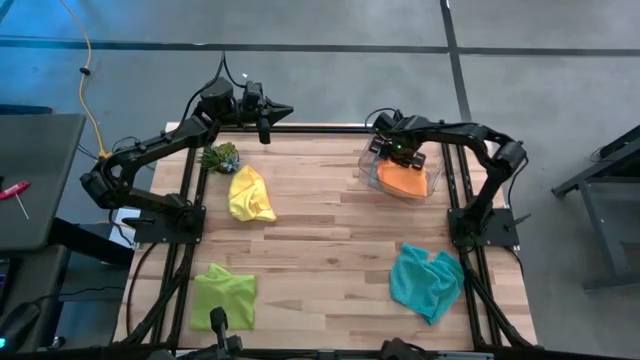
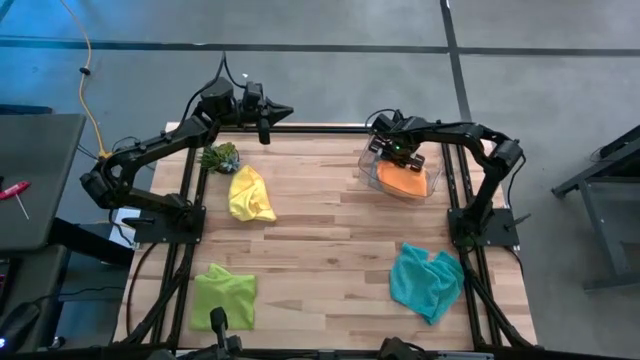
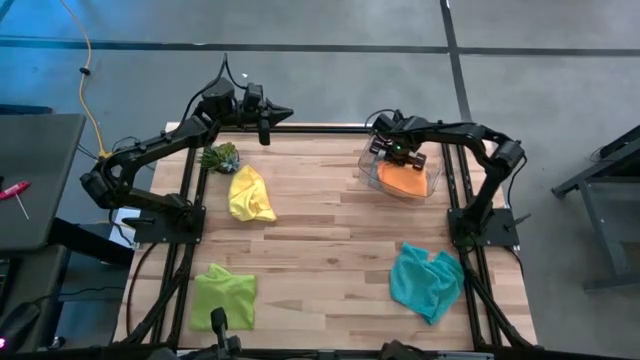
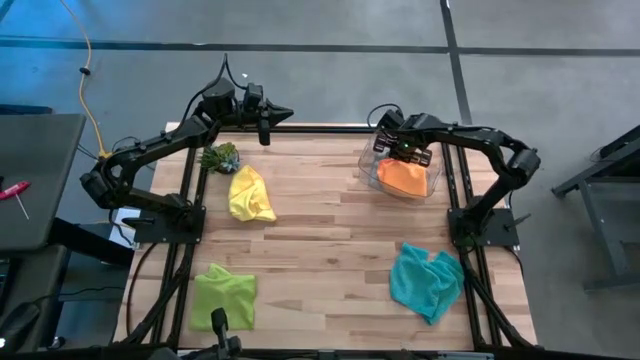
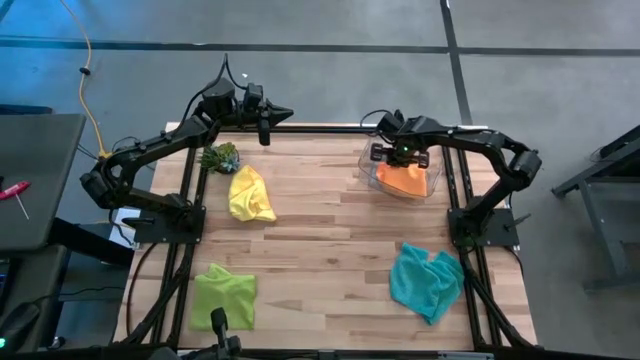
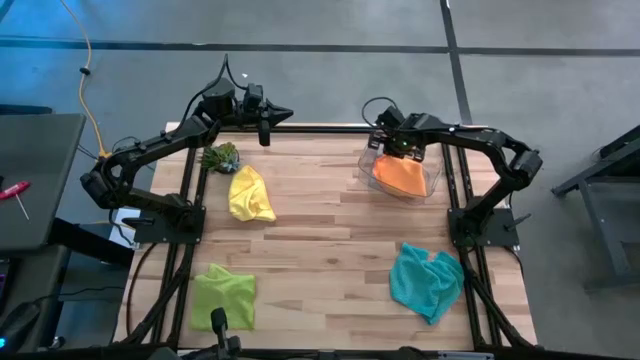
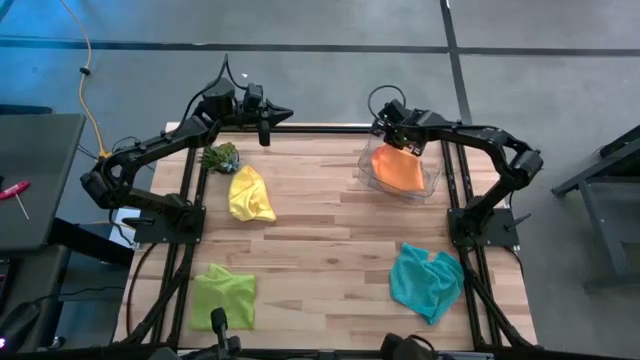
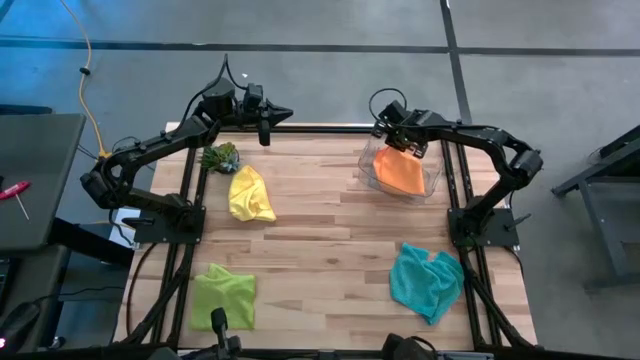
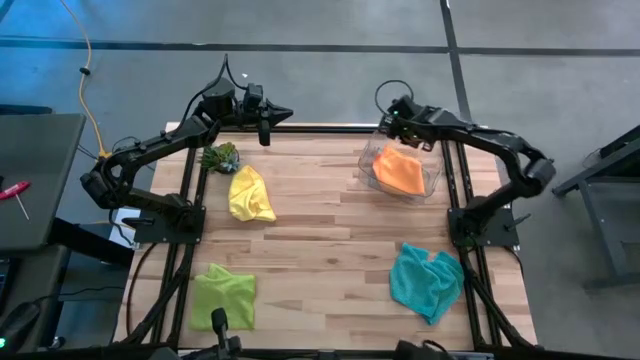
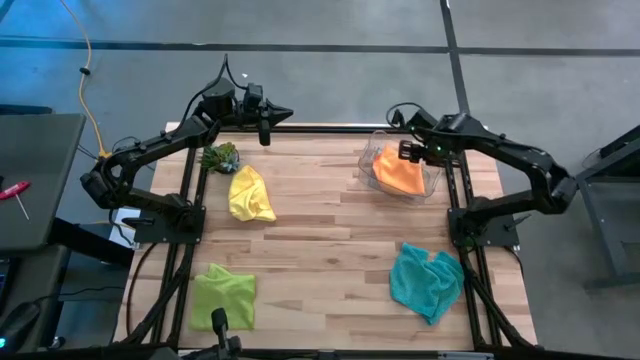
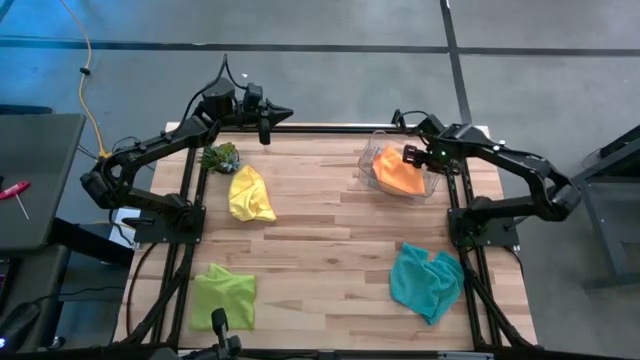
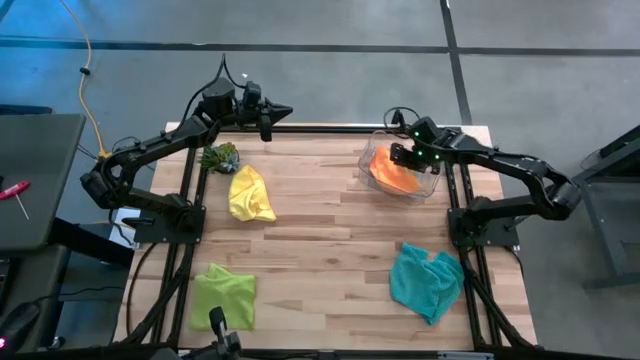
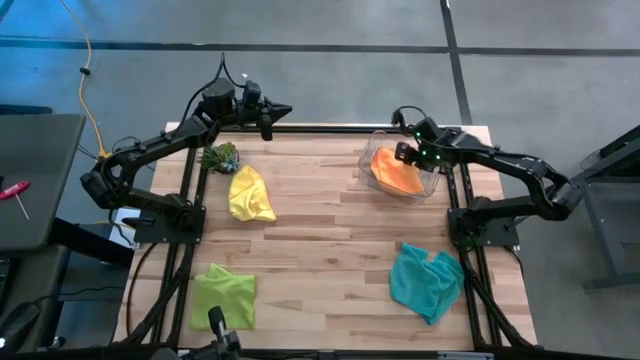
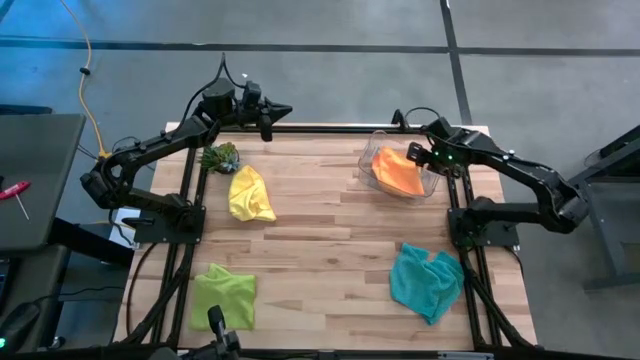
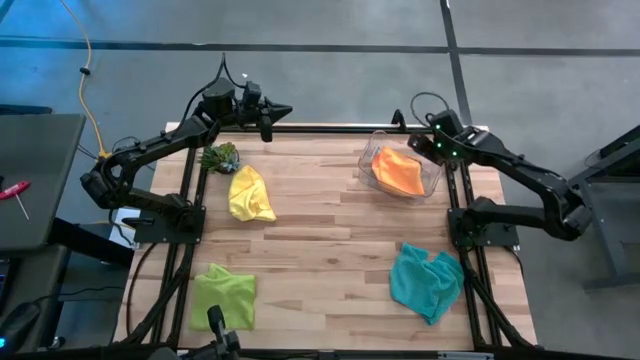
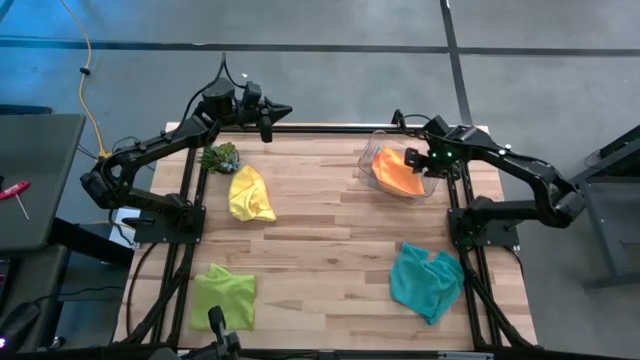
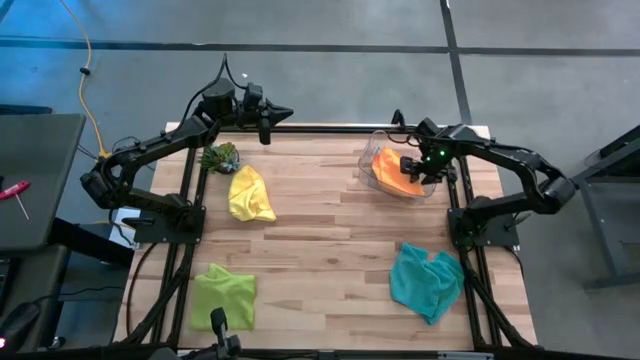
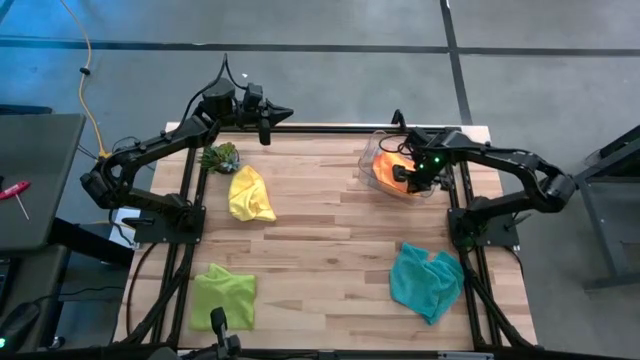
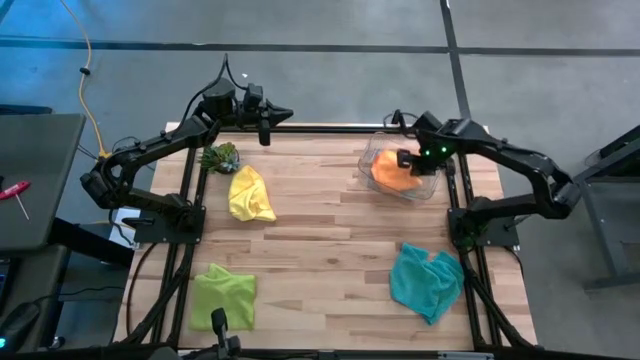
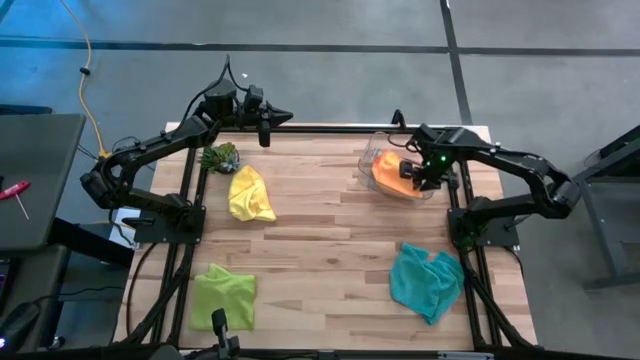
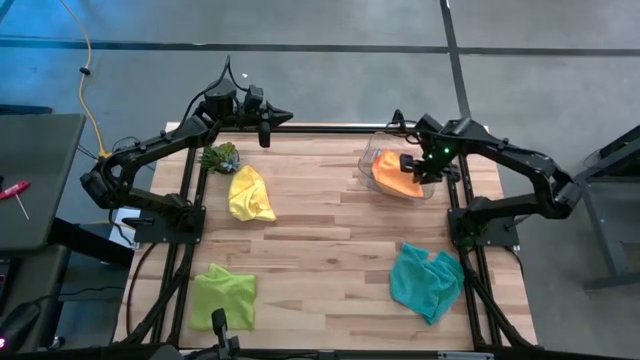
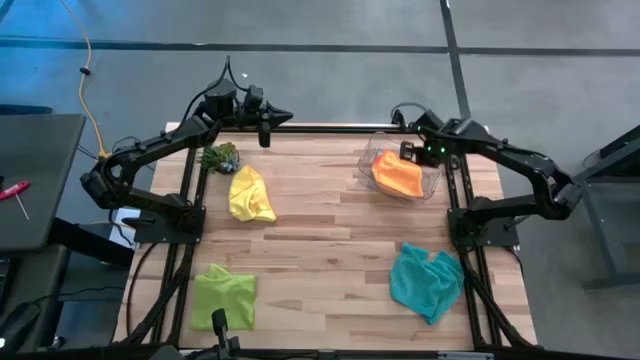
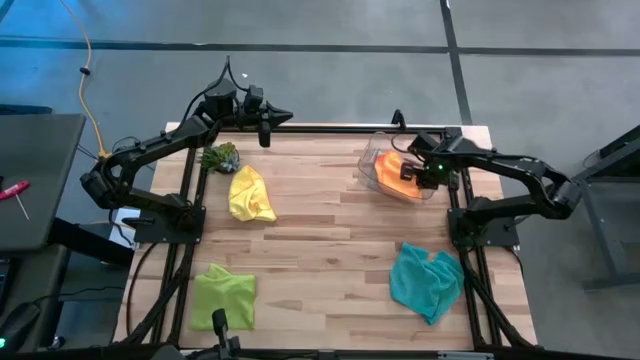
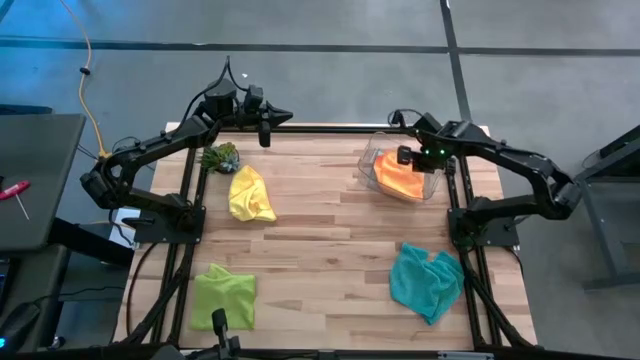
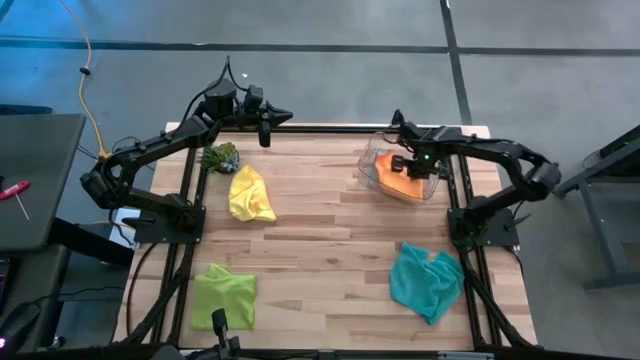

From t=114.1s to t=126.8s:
Task: Fold microfiber towels
Put the orange microfiber towel into the transparent bin

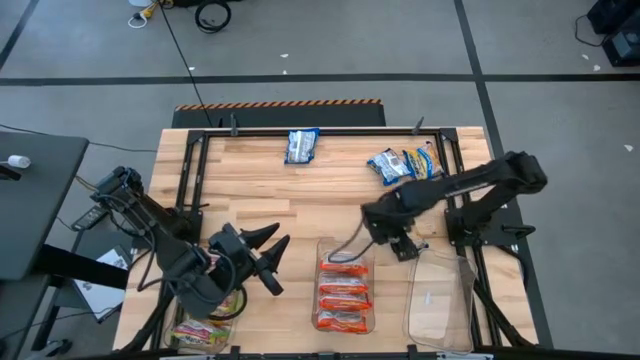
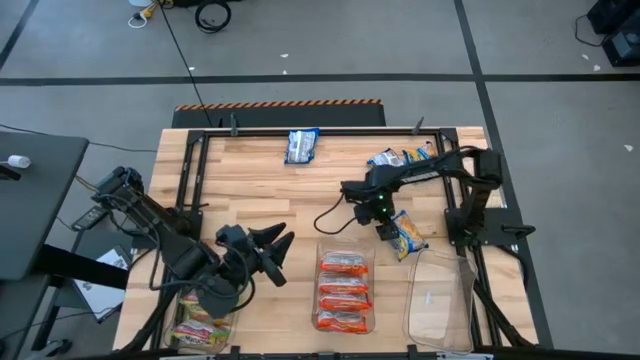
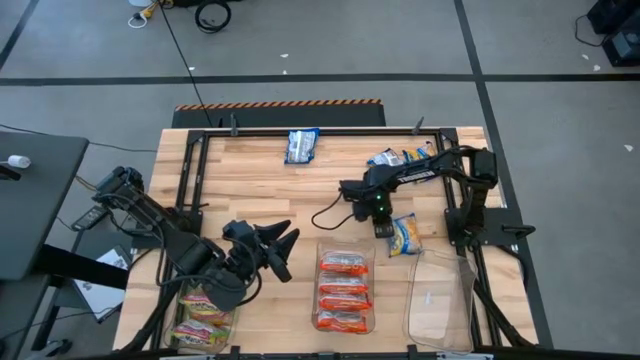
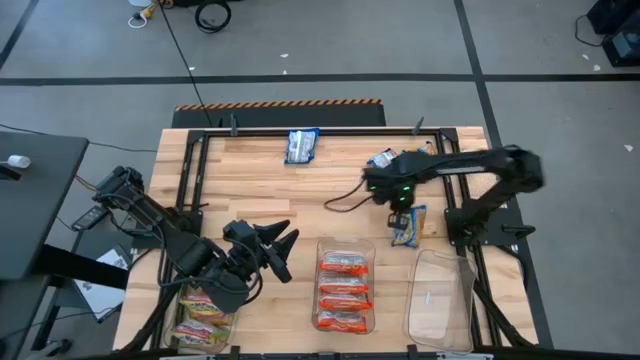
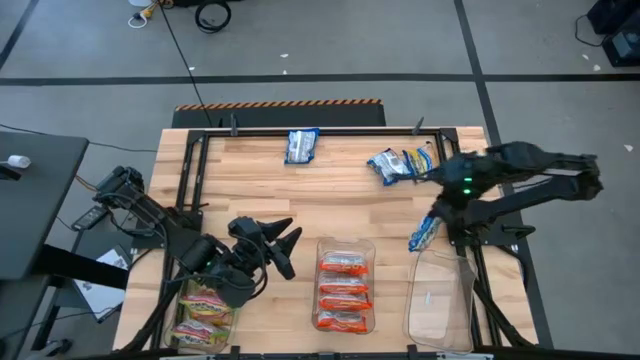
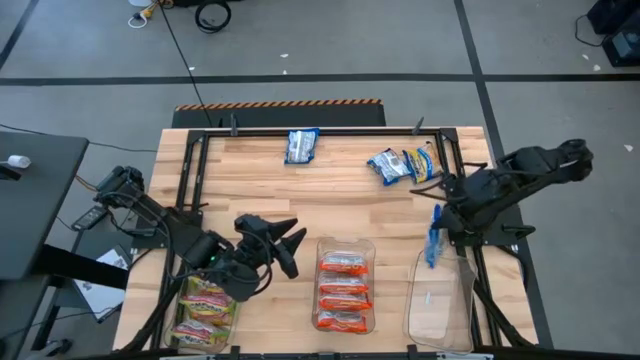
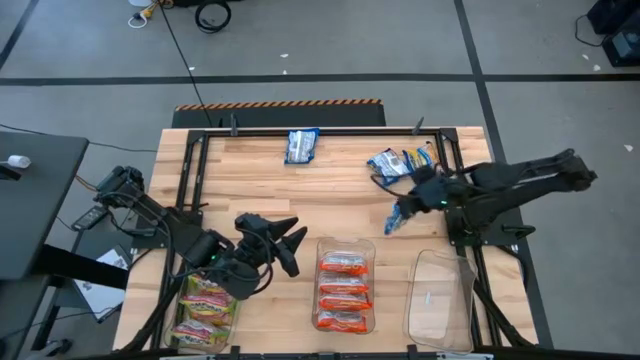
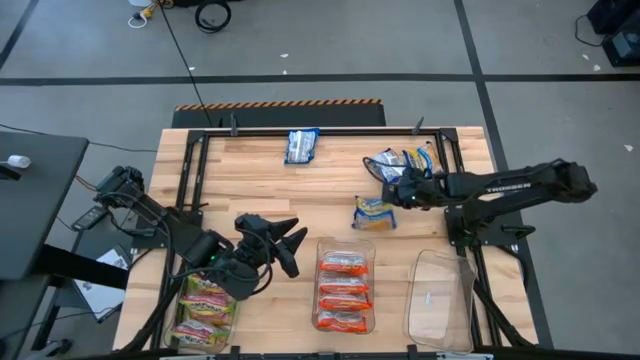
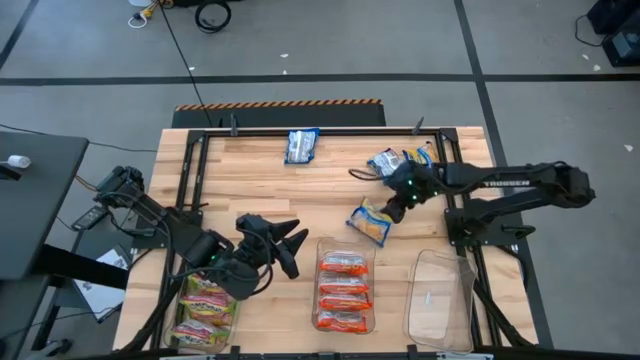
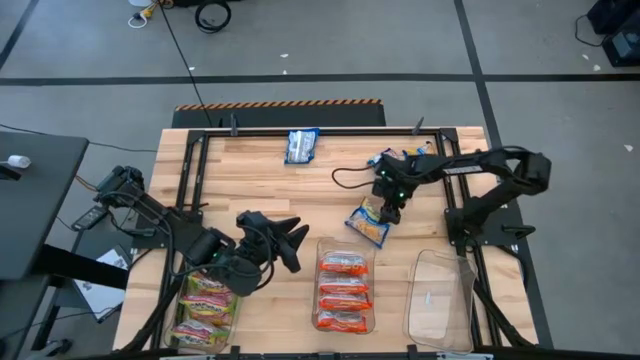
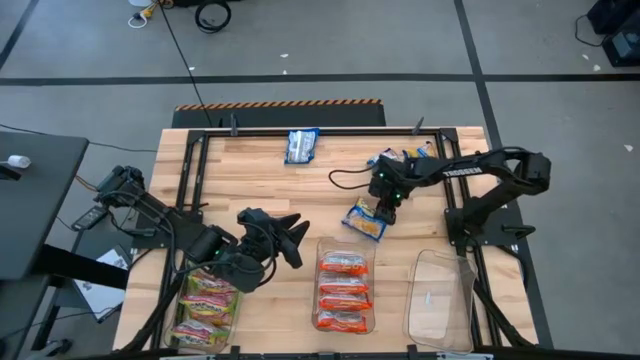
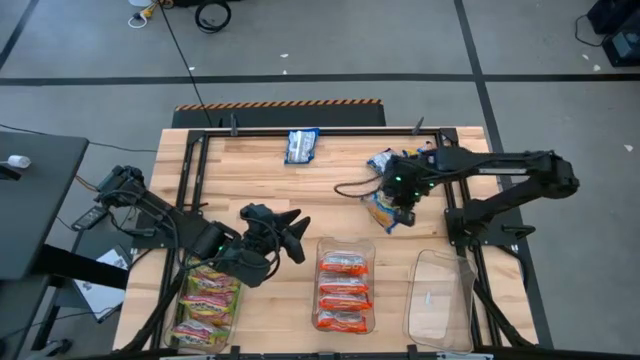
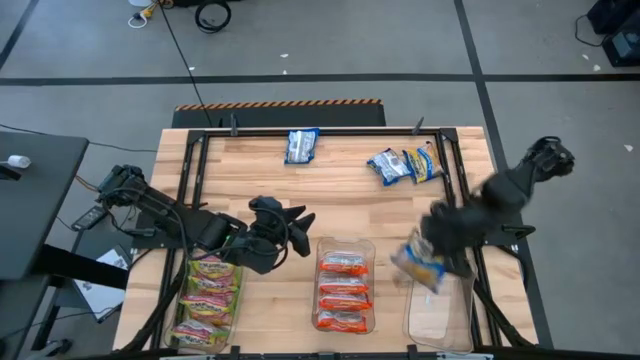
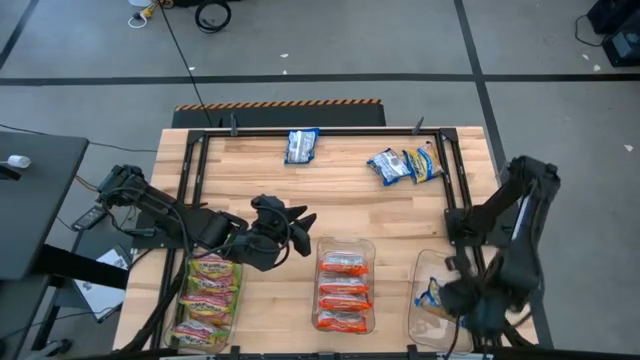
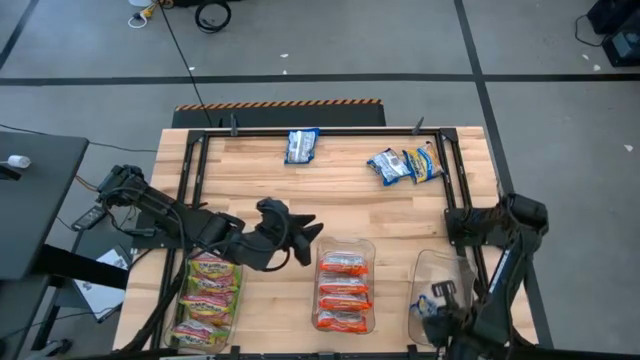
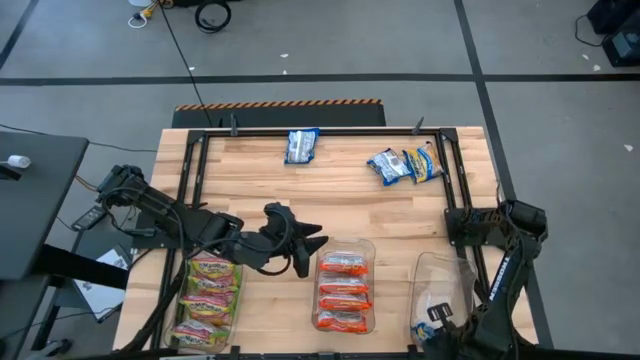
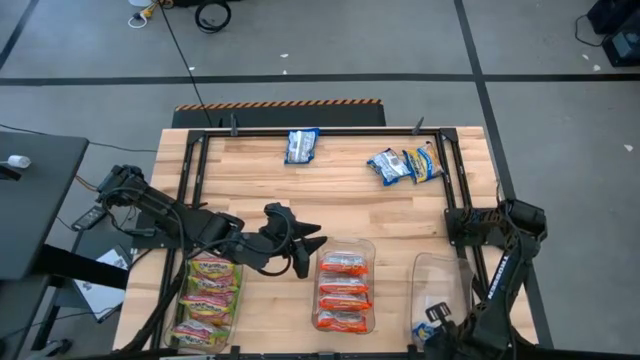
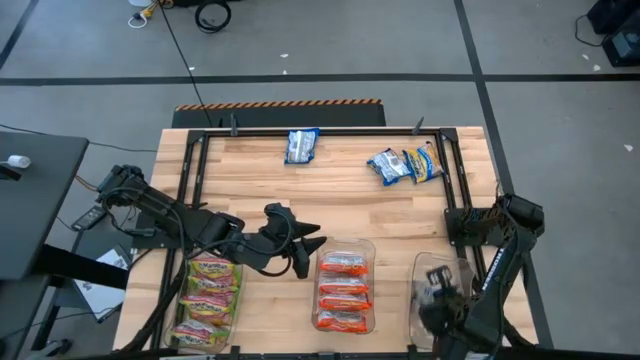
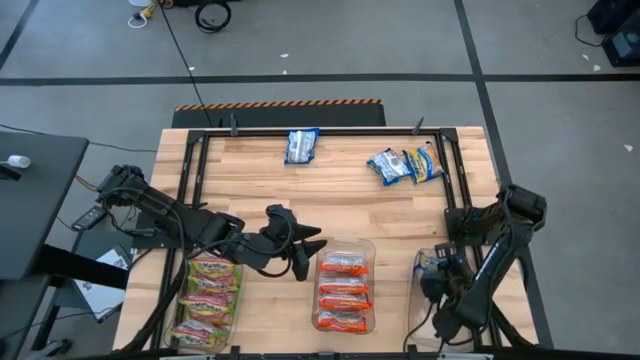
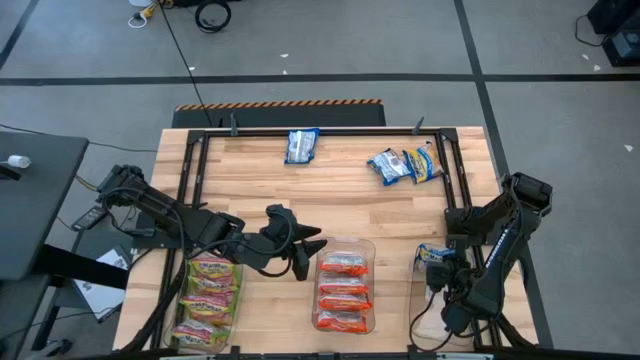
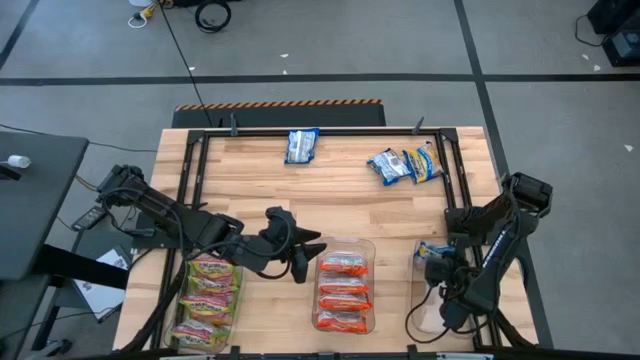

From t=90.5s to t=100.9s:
Task: Sort Maruchan noodles
Put the blue noodle pack into the right transparent bin
